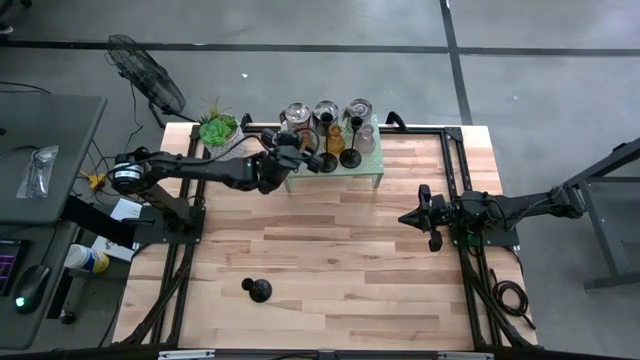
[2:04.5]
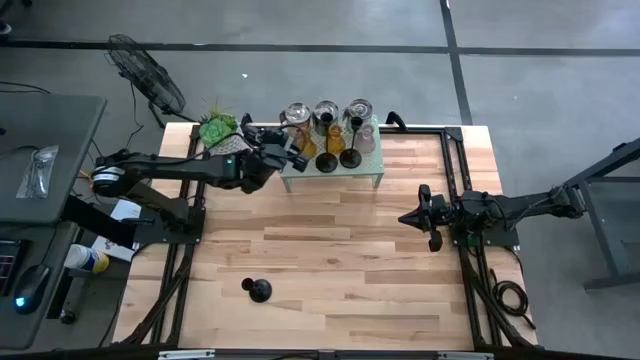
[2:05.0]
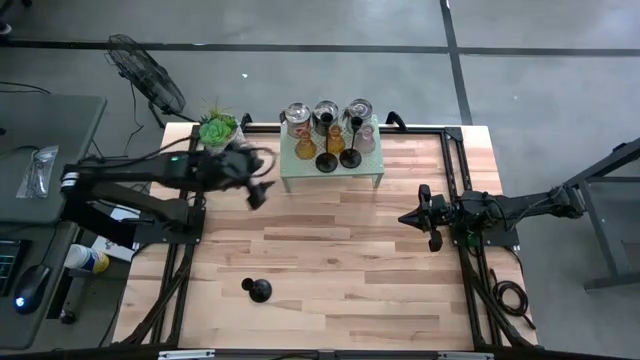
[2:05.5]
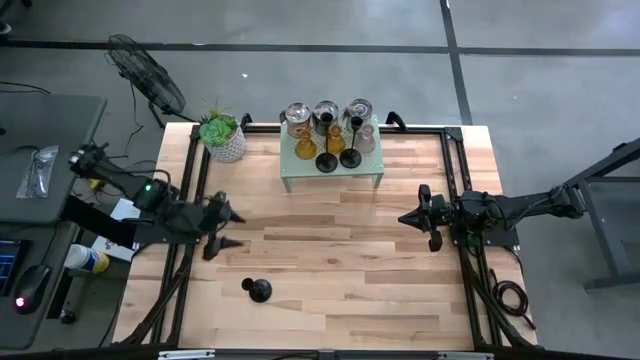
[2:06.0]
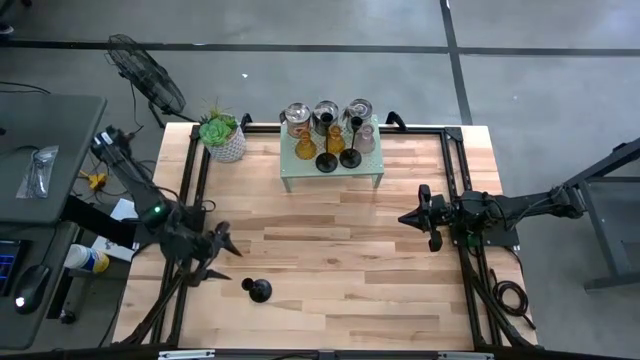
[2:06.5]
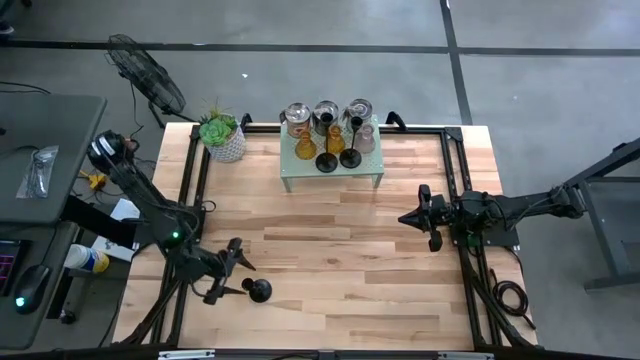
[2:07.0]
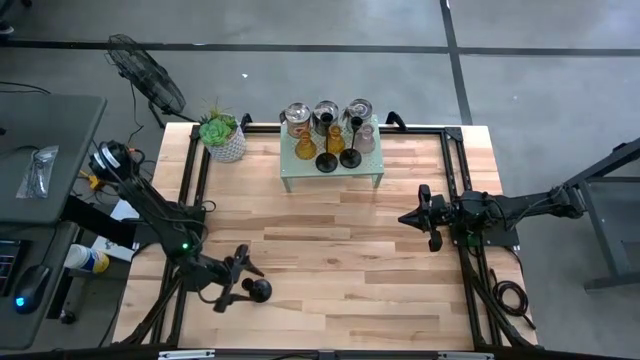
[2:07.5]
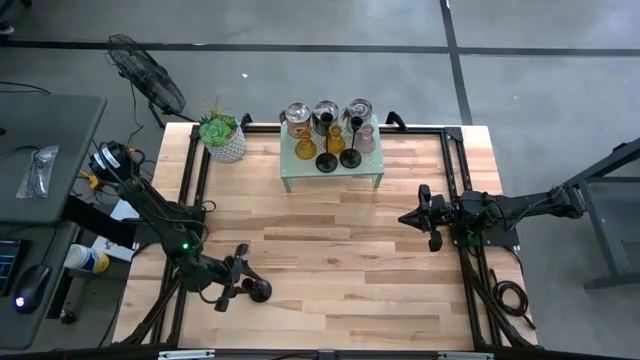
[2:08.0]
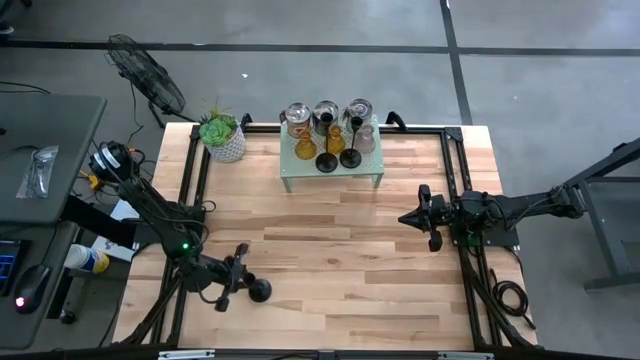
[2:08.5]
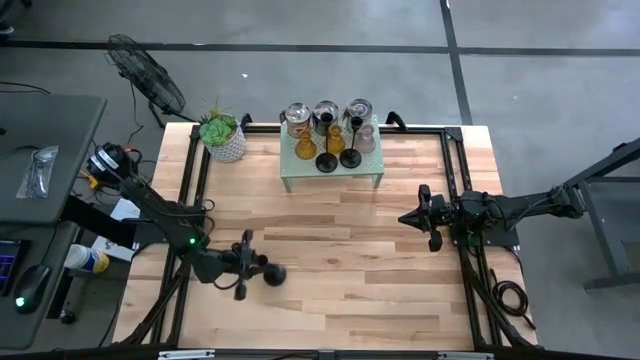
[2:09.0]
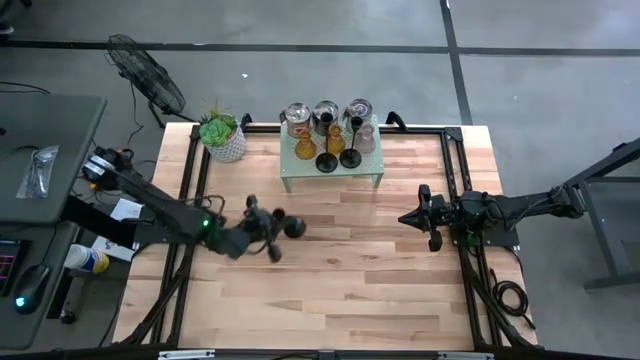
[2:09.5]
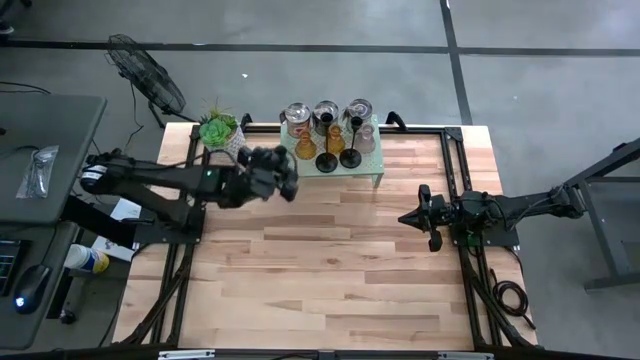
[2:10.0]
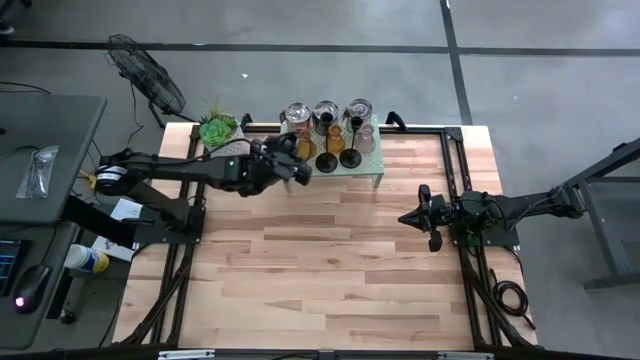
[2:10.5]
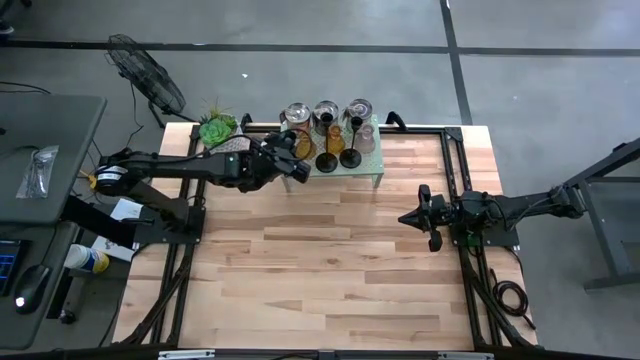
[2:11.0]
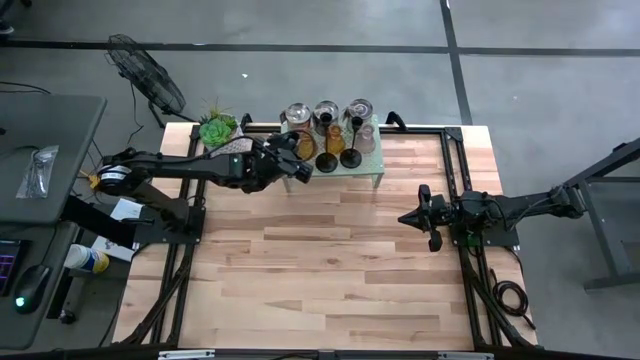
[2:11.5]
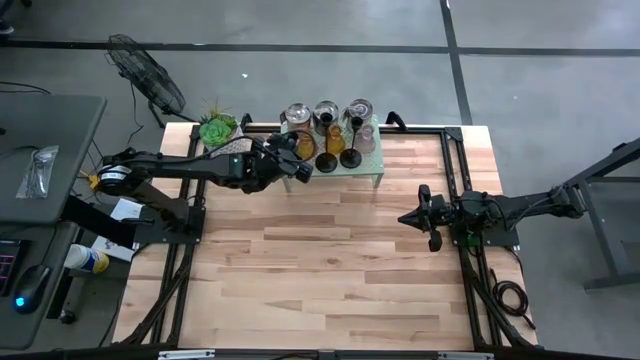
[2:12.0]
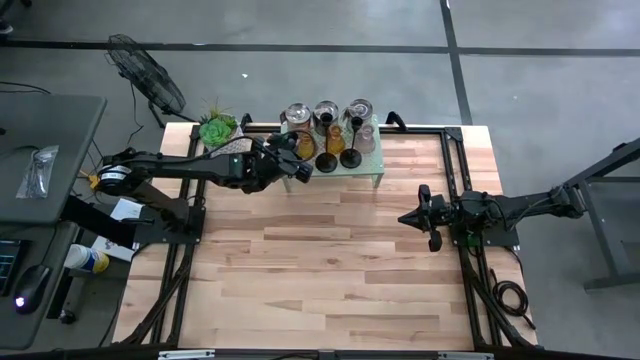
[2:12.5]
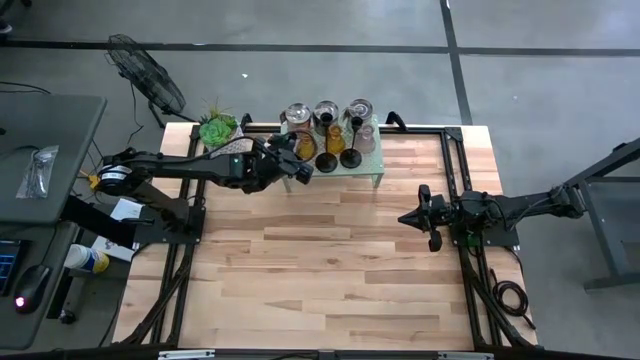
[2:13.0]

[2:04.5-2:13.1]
Task: Pick & Place candle stick holders
Put the black candle holder on the shelf

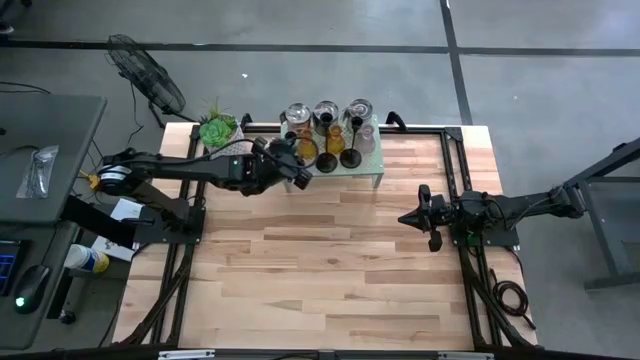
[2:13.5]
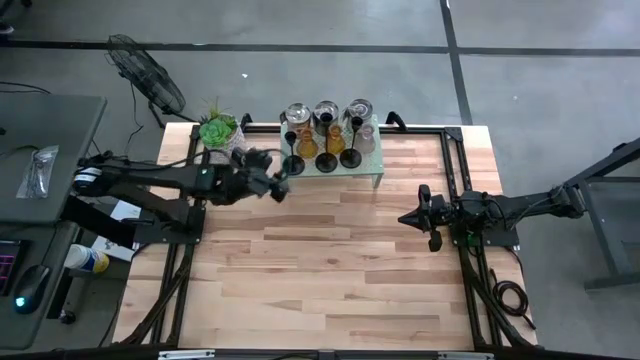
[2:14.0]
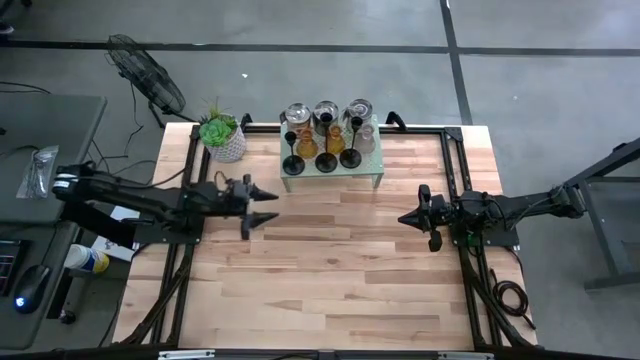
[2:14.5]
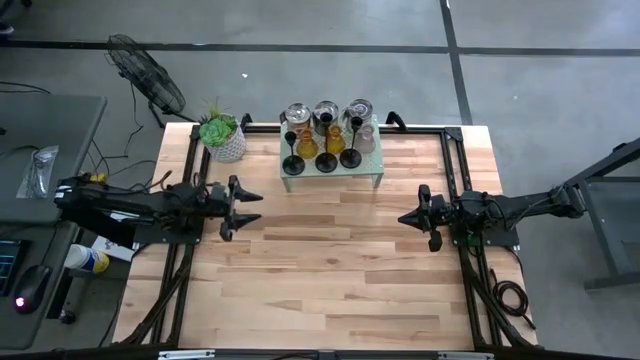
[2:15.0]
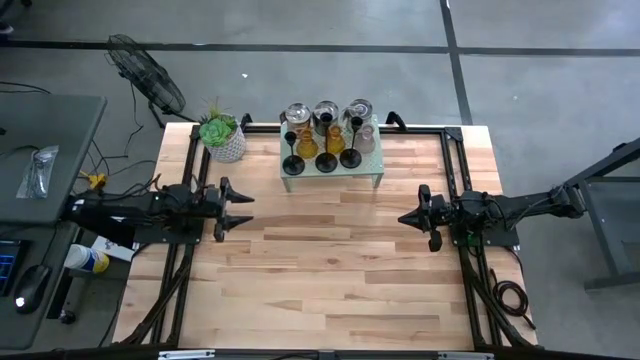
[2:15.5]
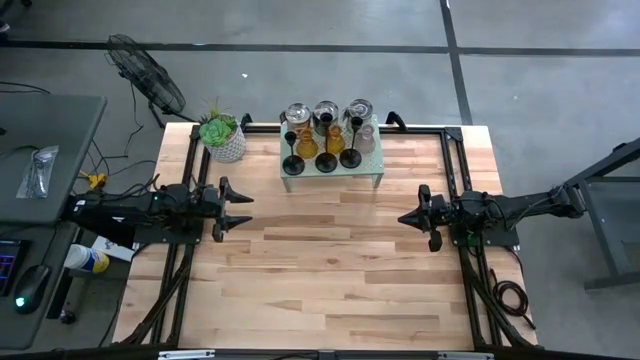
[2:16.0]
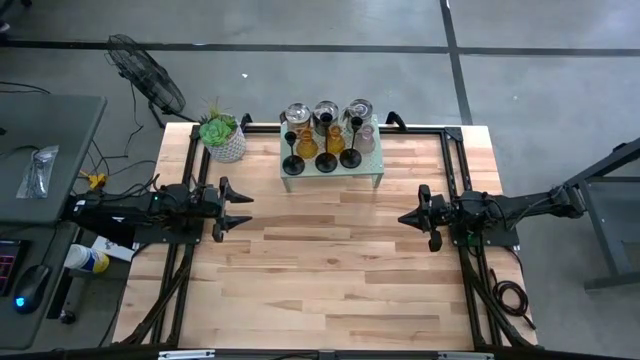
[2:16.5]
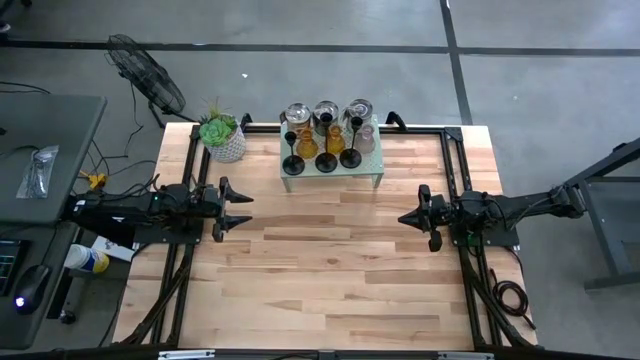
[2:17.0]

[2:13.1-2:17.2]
Return to Home Position

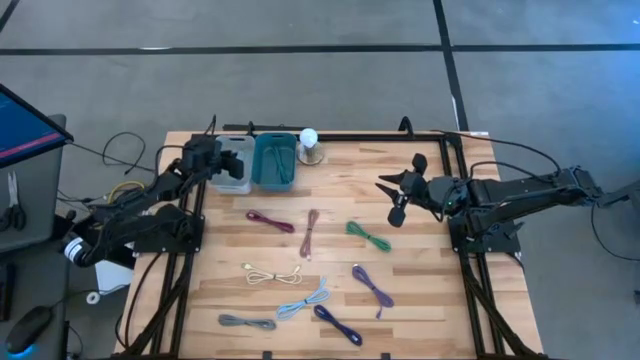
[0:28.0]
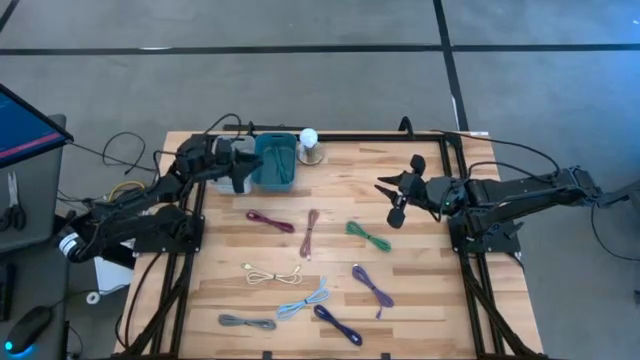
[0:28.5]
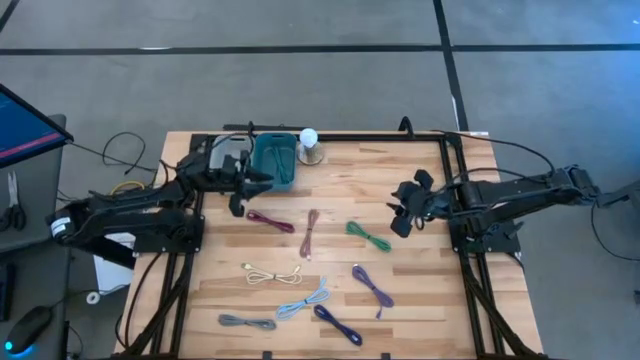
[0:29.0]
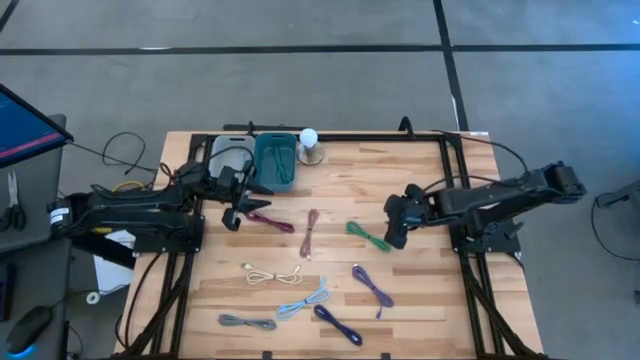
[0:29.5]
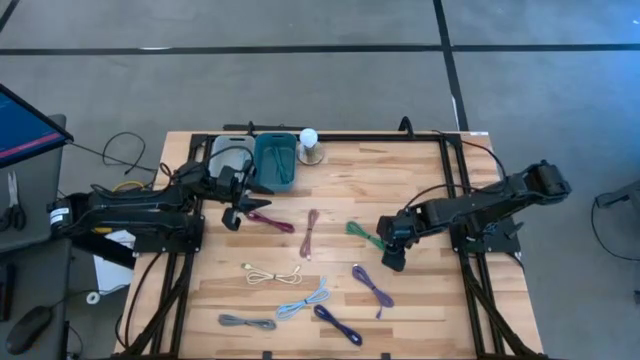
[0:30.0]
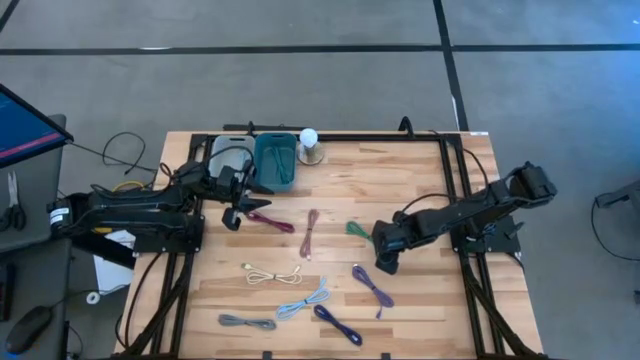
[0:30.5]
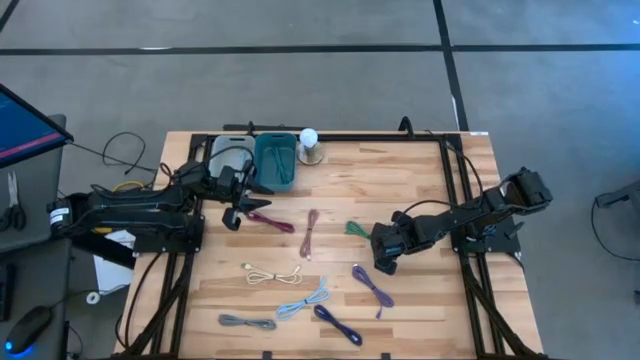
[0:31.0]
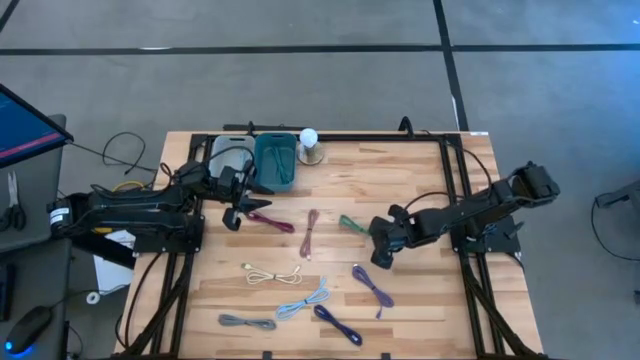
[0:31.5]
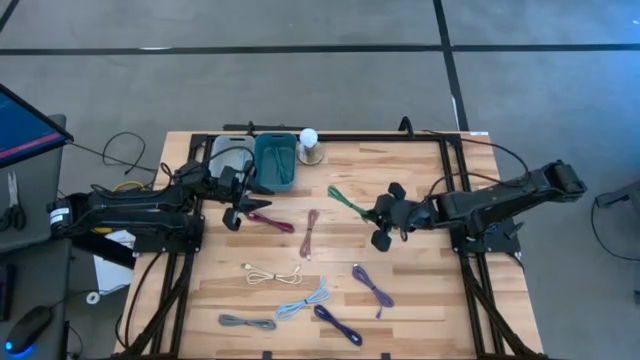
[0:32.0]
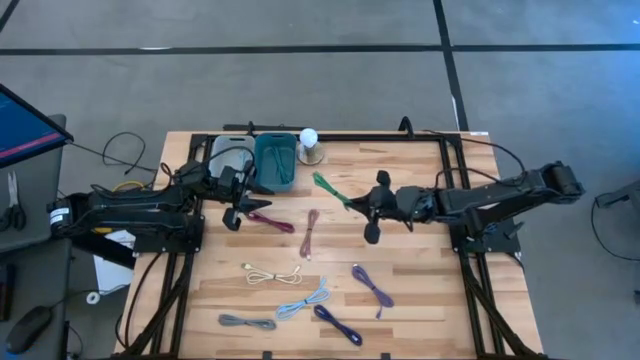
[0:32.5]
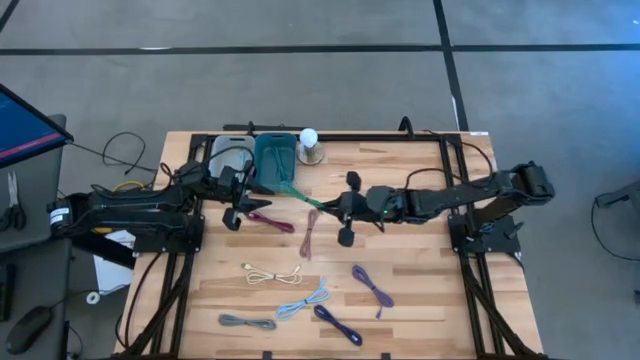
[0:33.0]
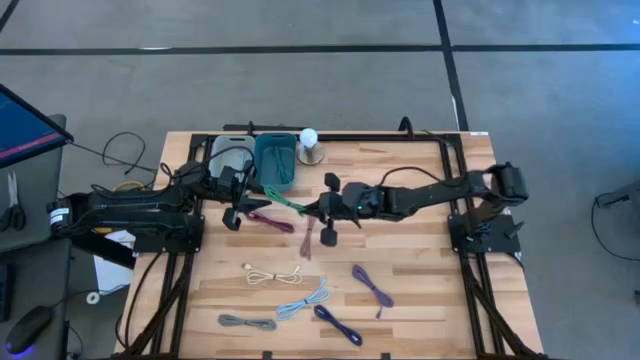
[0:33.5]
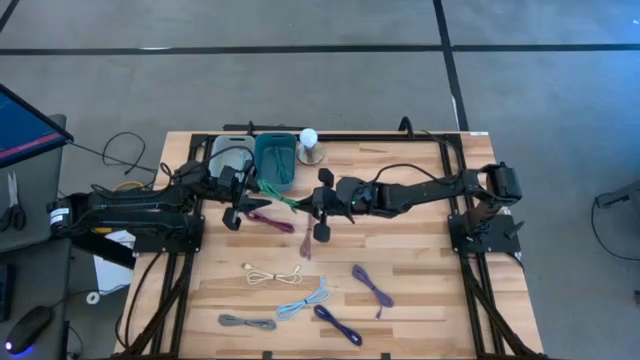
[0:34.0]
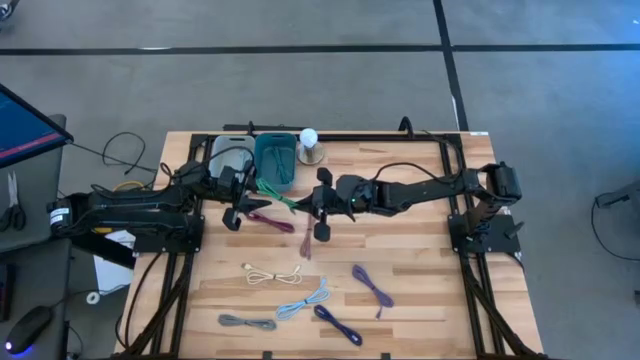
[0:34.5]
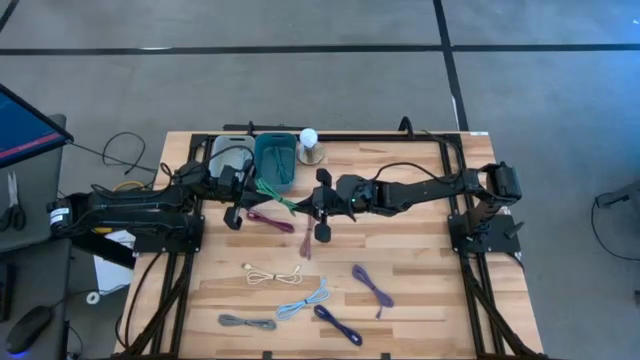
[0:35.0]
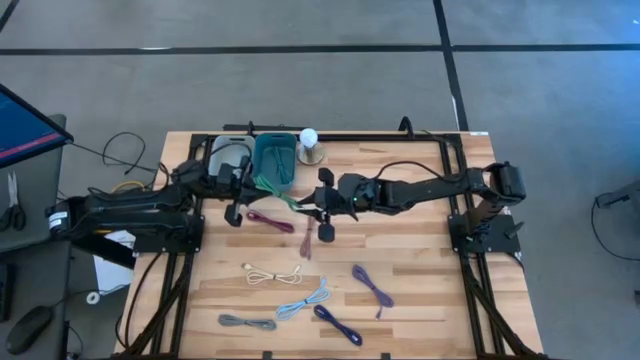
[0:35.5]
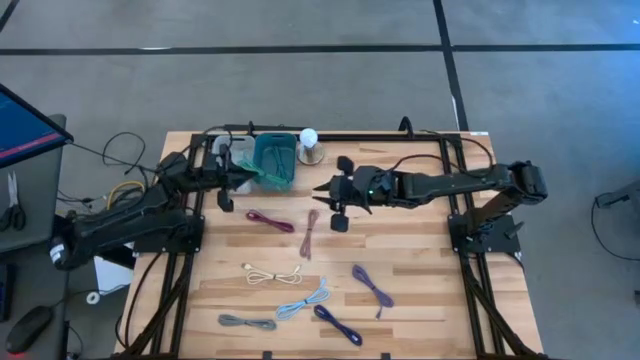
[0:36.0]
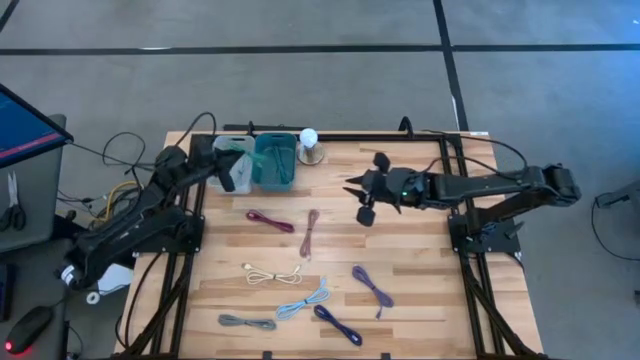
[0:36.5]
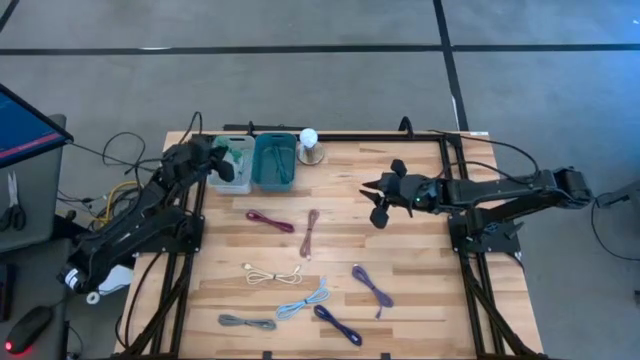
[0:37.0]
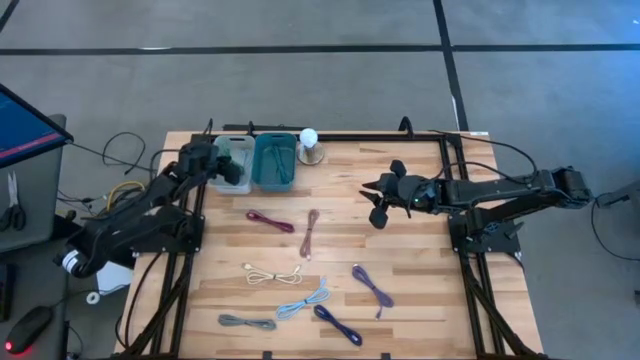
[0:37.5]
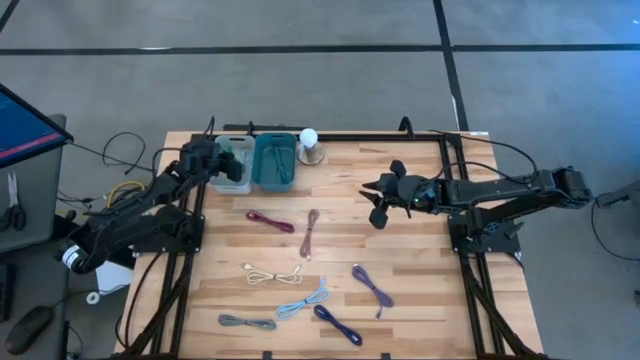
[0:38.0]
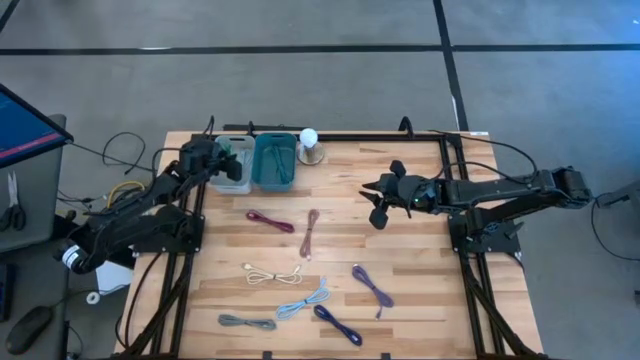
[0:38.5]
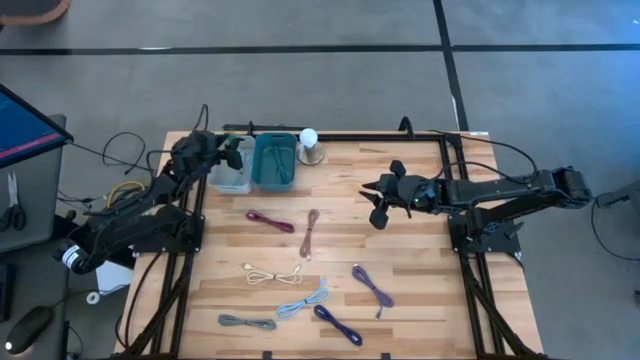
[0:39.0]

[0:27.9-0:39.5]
Task: Pick & Place USB Port
Put the green charger cable into the gray bin
